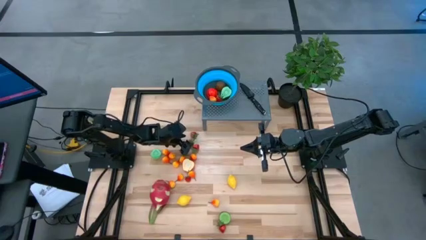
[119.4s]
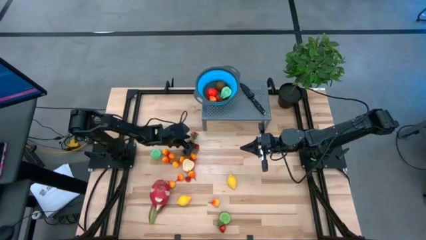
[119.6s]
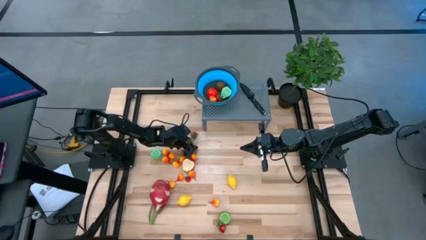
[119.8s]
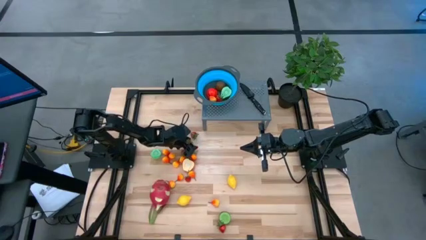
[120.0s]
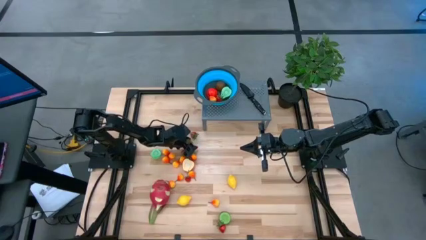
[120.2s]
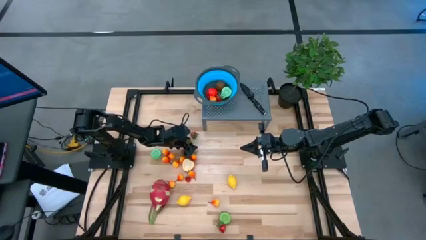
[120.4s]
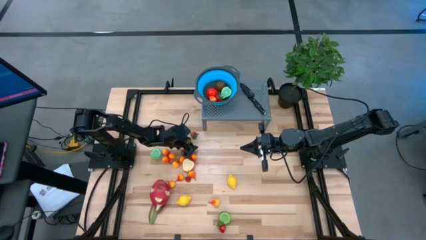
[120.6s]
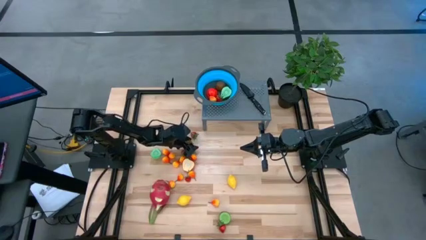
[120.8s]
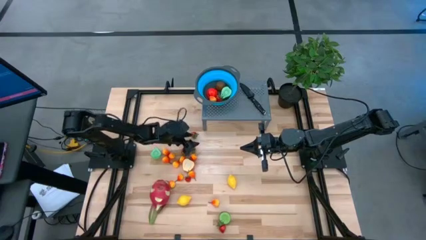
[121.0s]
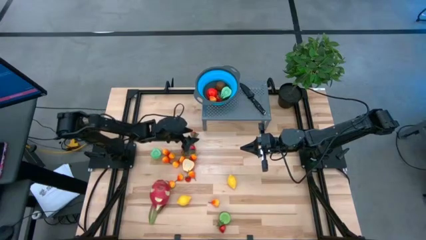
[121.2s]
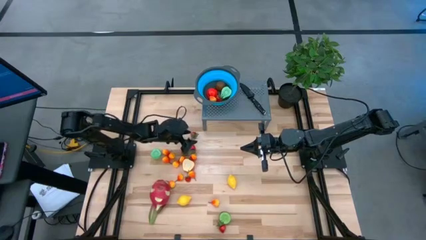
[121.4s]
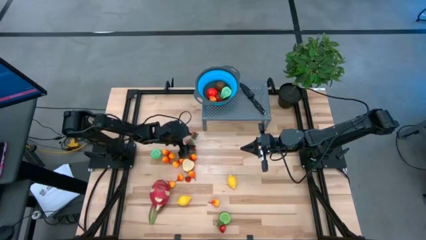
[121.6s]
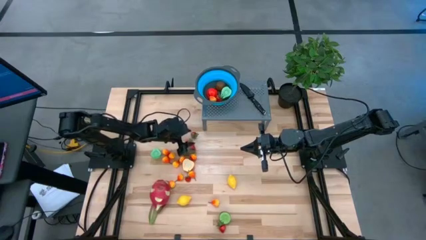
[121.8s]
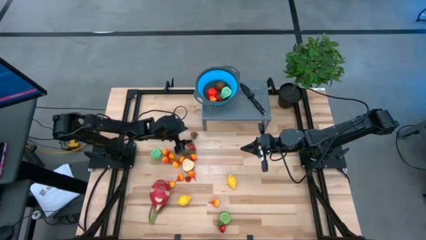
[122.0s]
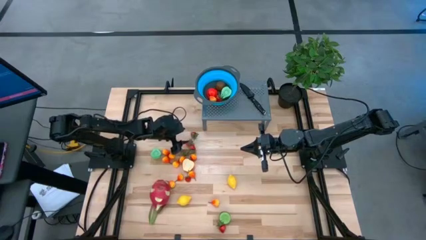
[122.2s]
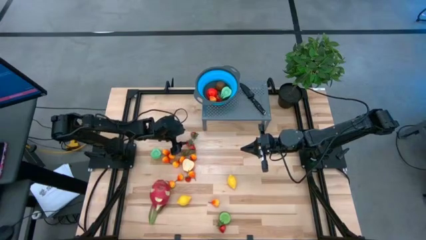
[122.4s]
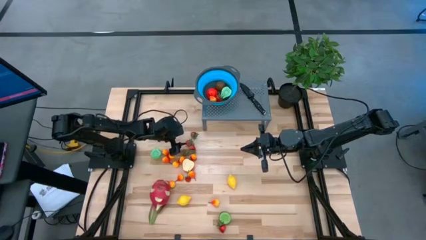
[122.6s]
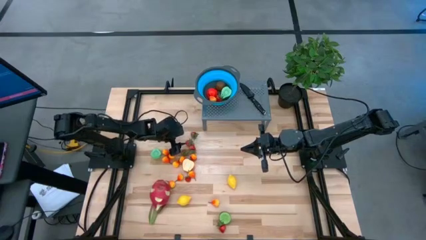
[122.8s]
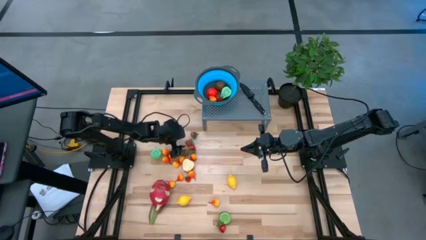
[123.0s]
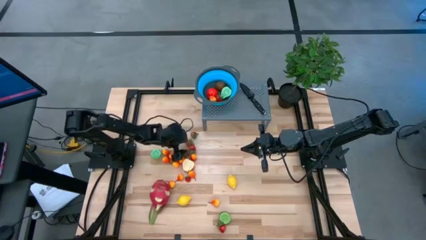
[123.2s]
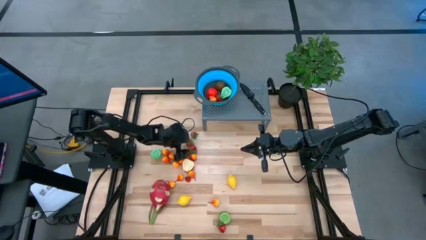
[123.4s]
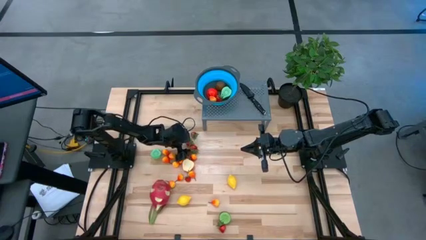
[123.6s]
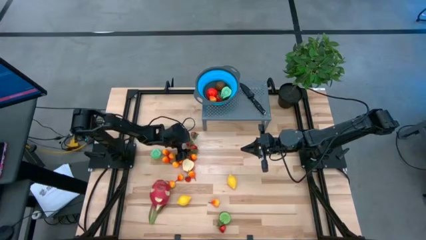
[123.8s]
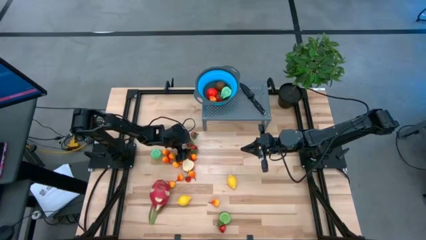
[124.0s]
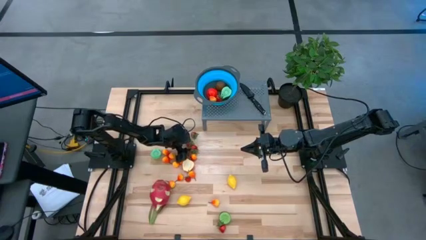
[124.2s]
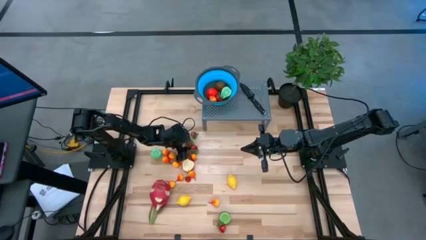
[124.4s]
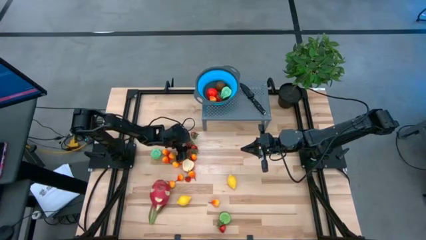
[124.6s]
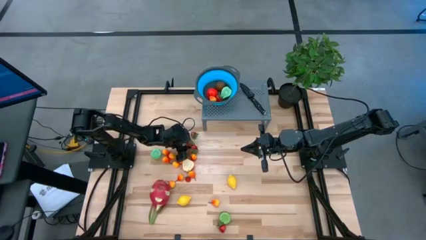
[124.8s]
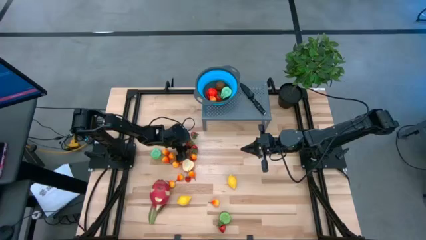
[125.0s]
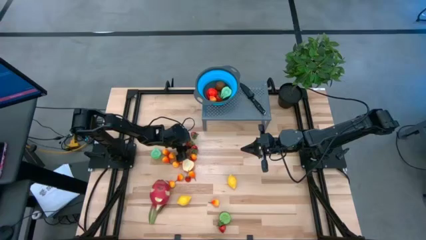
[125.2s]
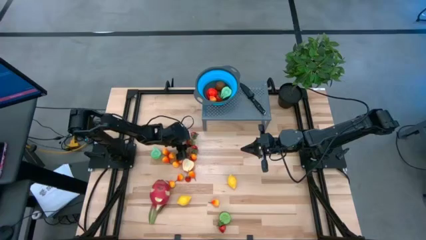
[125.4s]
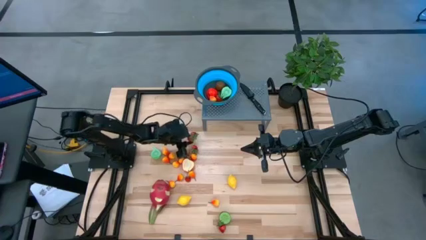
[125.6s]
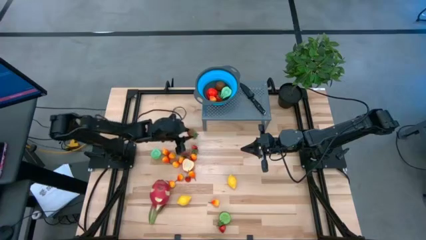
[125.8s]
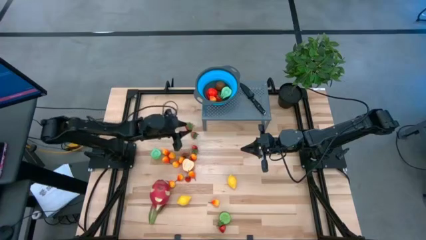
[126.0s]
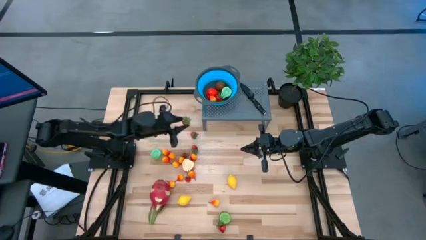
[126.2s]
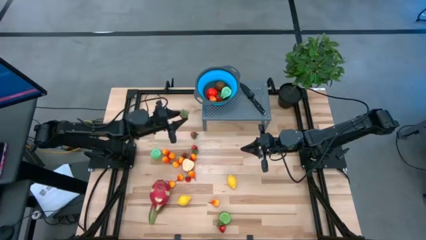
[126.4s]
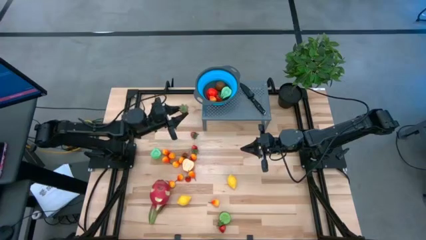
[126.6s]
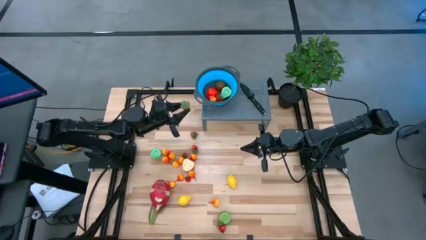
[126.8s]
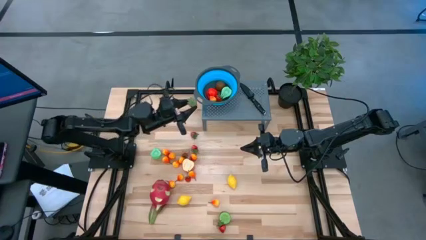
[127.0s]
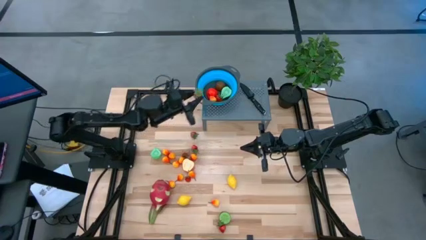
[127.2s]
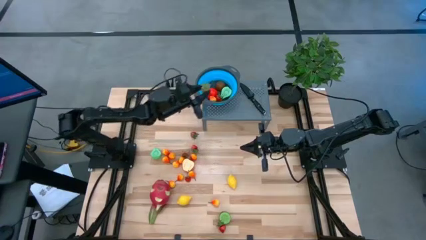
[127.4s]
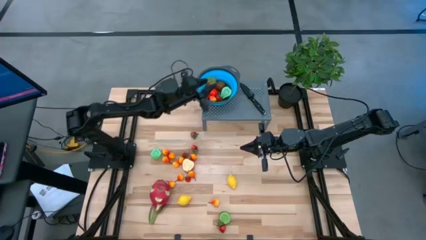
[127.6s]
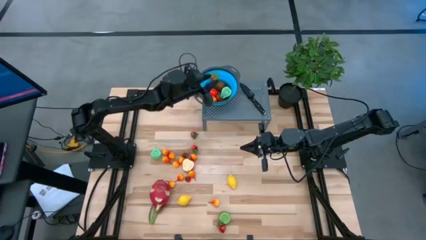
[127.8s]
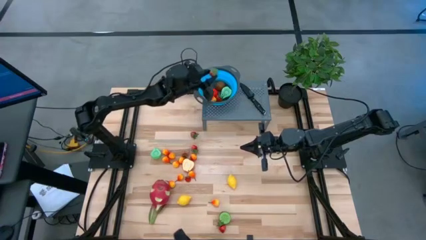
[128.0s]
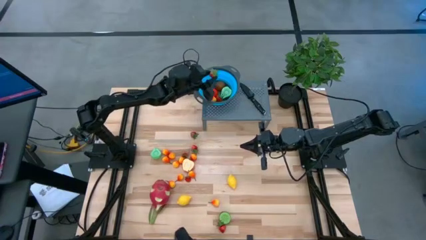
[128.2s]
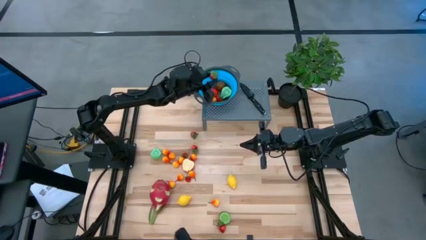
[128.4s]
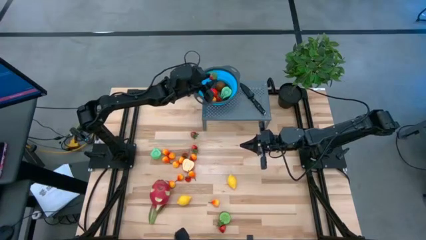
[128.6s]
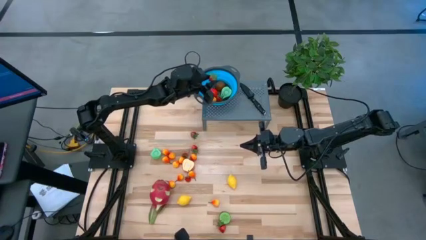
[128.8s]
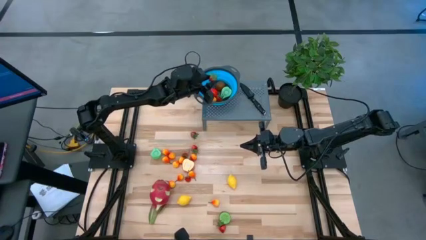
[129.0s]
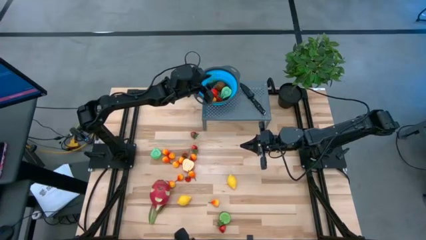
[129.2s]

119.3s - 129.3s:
Task: Pick & Place Fruit
Put the strawberry into the strainer bowl

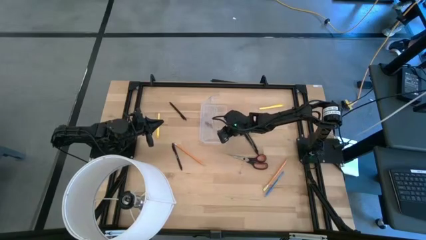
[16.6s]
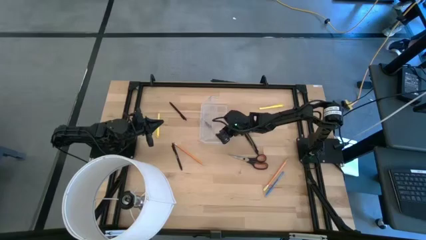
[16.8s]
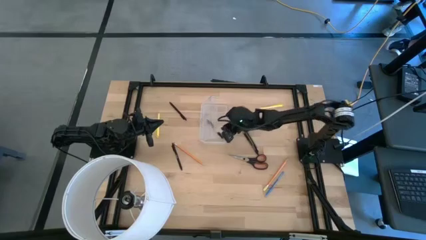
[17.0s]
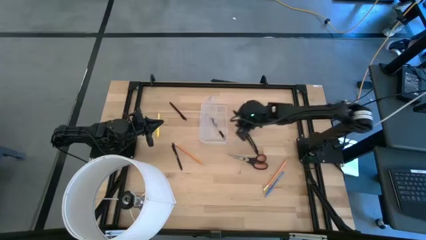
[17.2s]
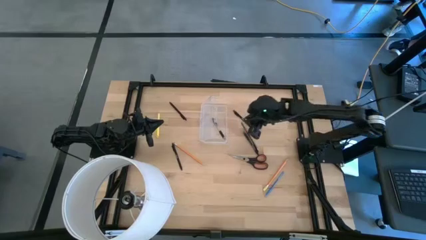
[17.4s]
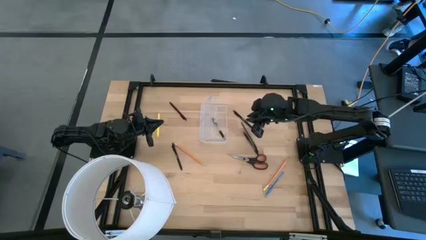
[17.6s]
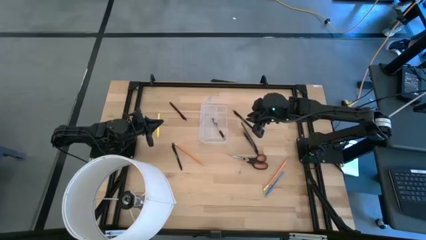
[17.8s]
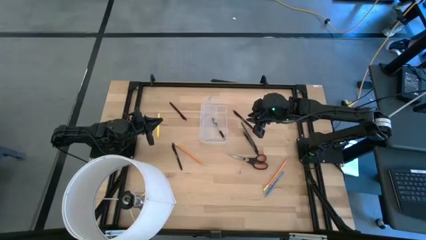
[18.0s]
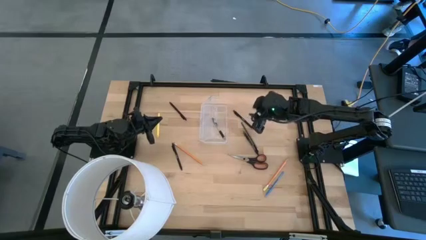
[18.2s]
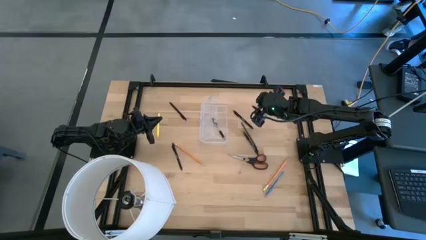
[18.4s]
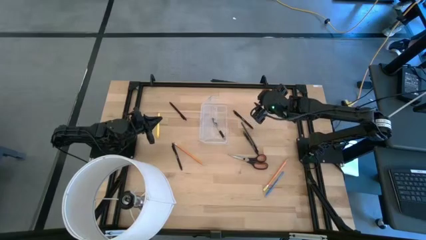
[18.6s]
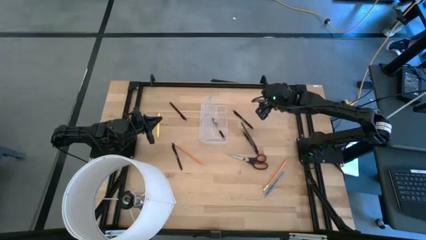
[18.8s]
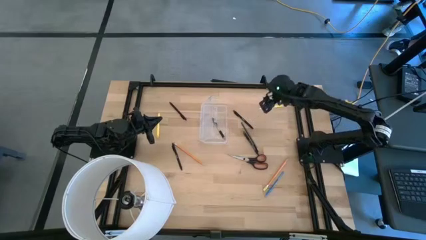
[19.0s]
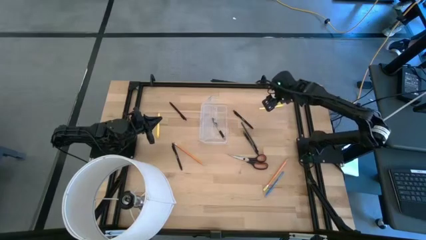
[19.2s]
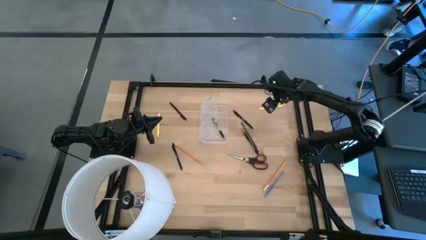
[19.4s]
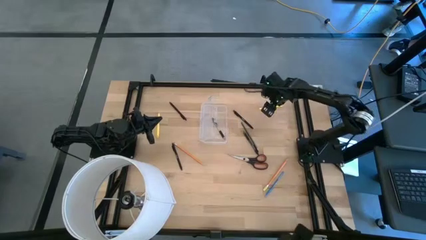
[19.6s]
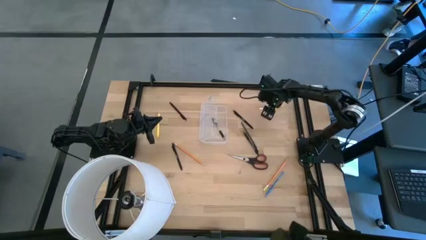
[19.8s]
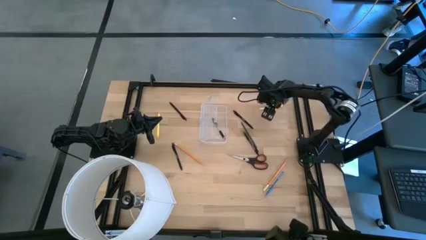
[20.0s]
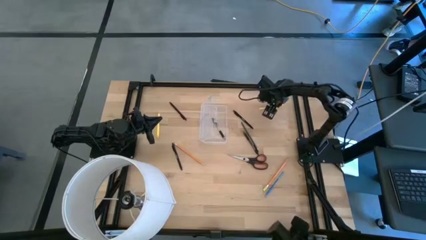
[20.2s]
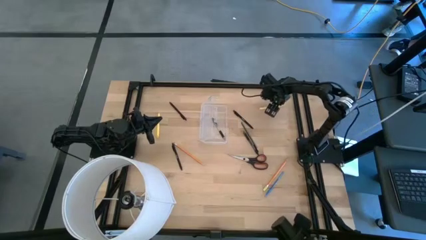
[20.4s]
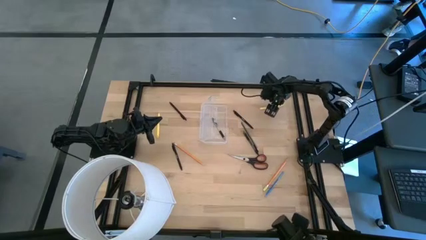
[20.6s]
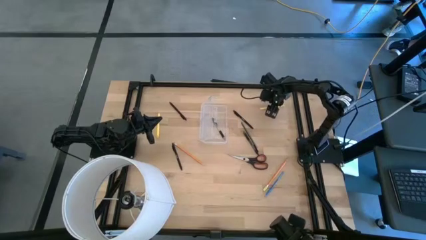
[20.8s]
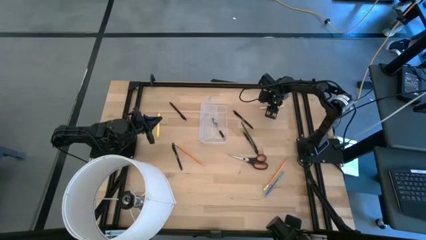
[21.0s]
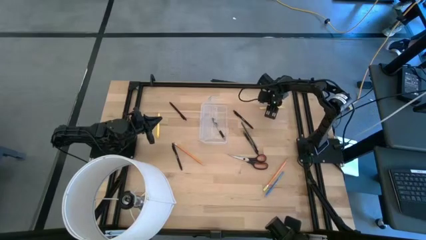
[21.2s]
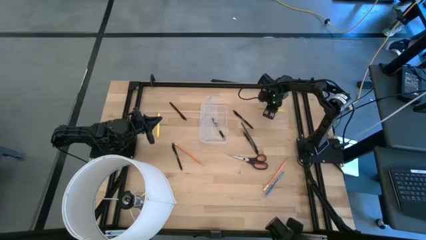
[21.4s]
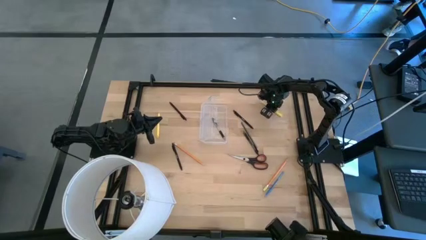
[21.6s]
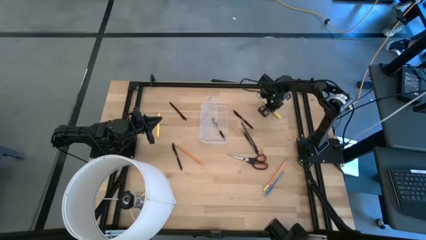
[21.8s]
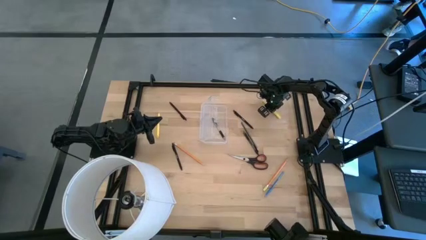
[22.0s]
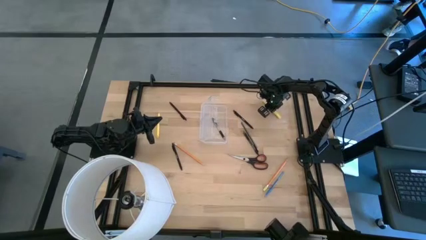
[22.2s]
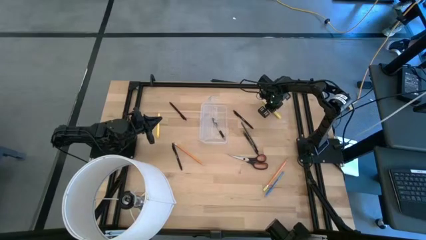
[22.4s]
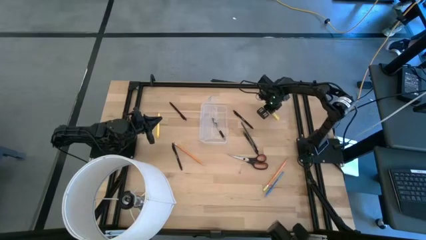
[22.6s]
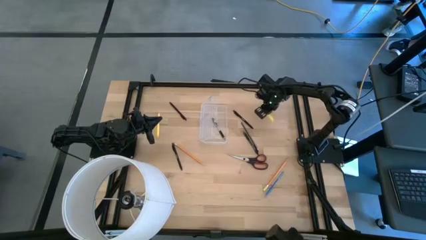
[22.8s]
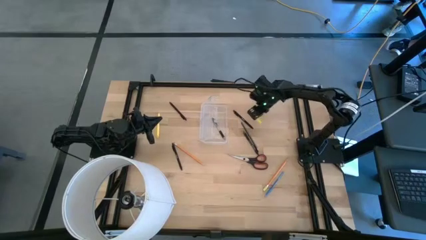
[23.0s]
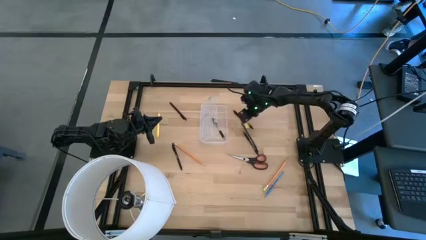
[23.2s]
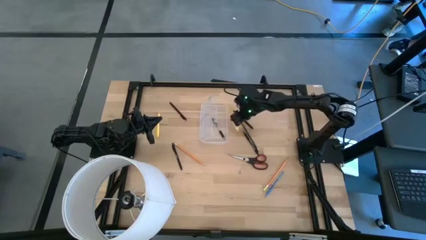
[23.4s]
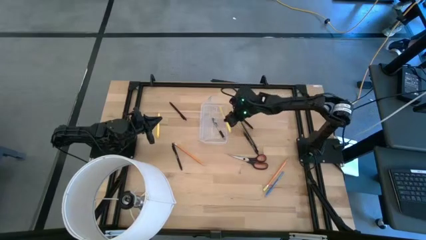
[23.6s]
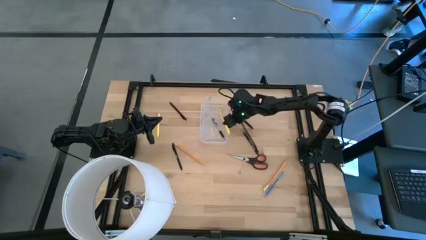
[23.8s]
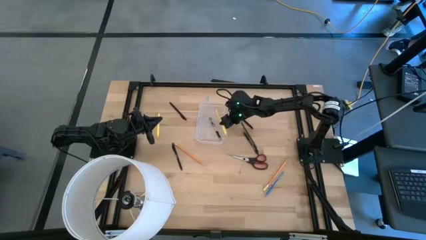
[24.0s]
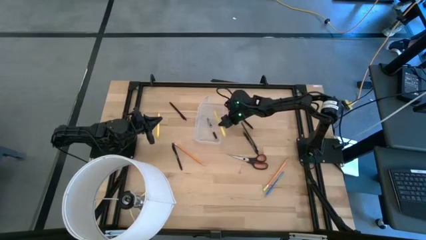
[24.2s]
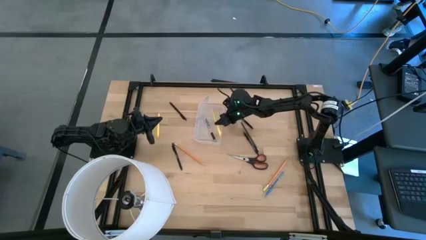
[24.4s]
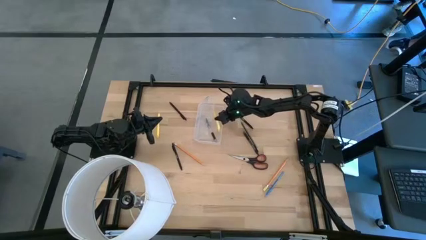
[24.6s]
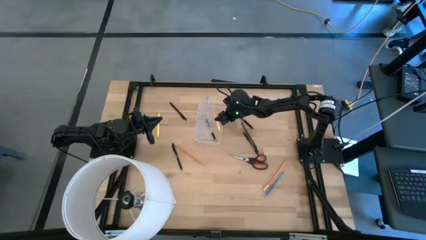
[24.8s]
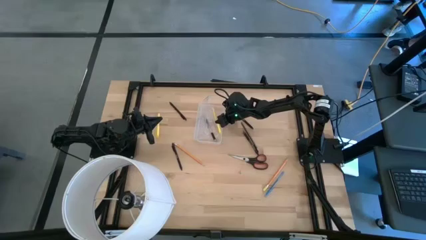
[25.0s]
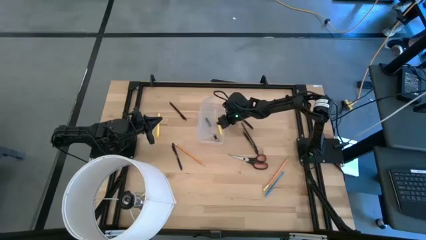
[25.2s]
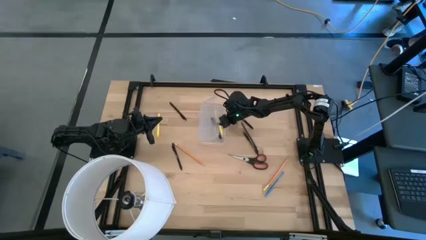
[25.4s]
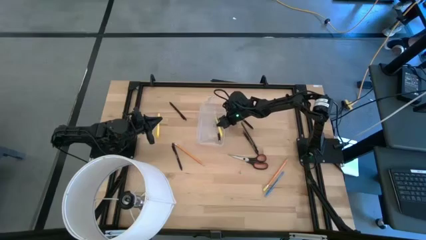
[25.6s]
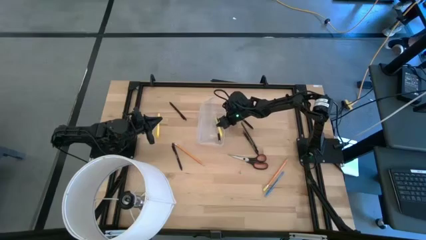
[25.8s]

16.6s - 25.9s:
Task: Pick & place school supplies into a supply box
Put the right yellow pen into the transparent supply box
